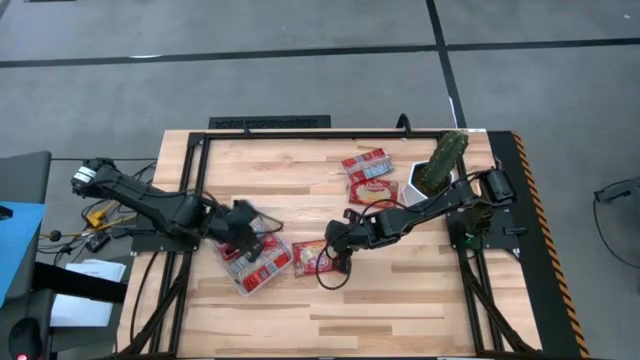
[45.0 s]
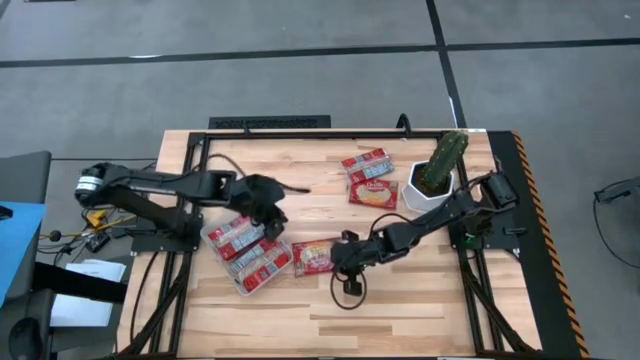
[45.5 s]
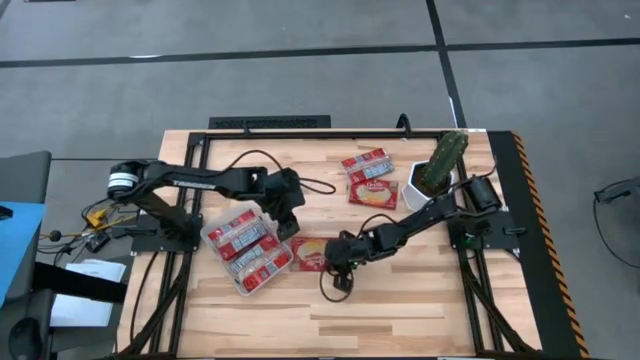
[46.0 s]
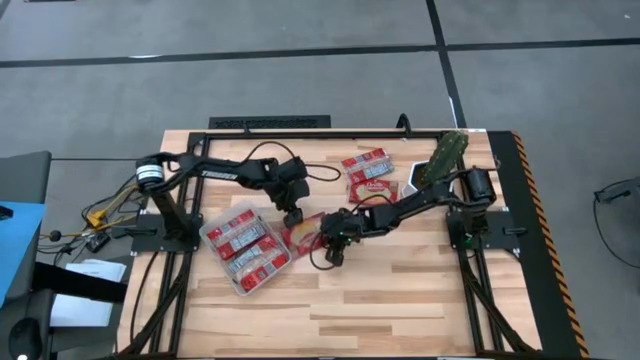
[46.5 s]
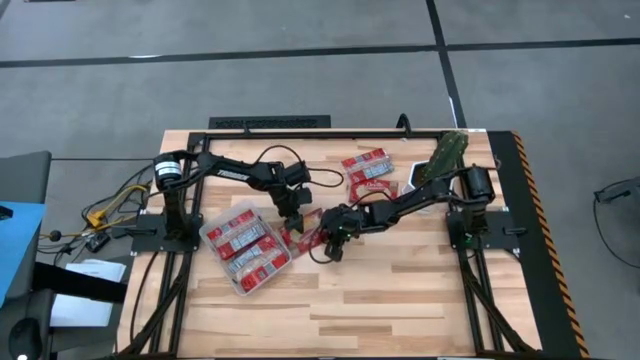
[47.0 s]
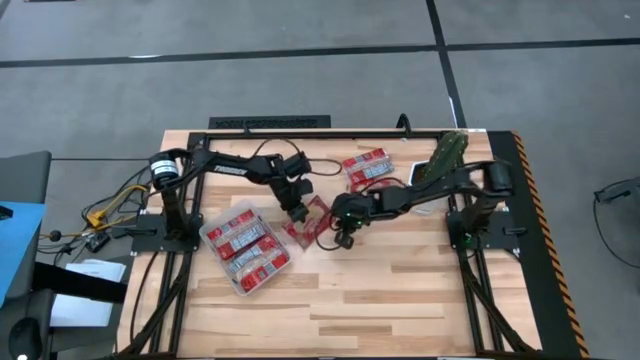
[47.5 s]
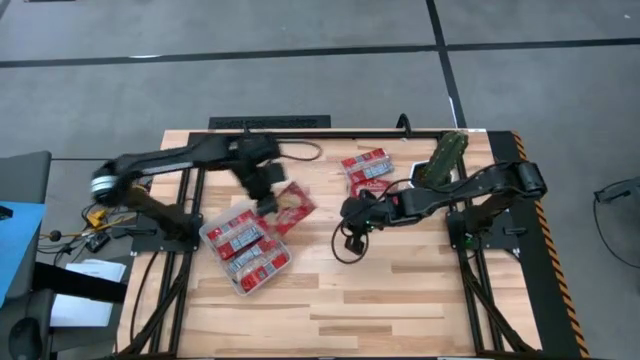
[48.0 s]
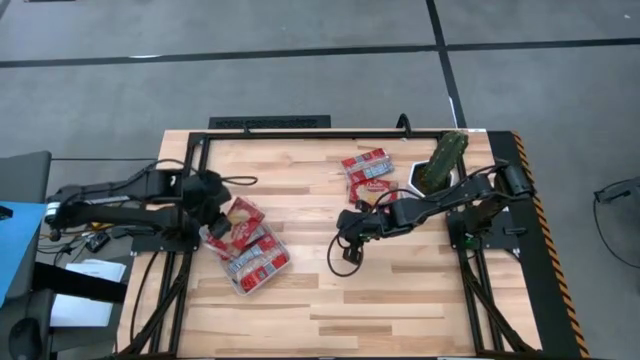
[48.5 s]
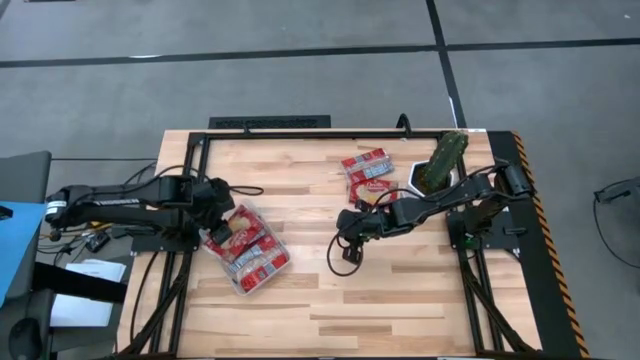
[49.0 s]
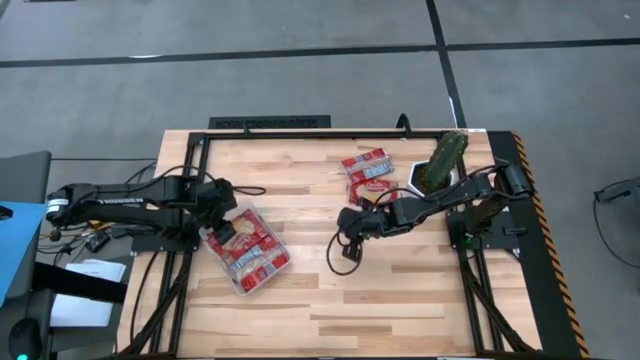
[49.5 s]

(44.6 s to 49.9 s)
Task: Sort popcorn bags into baskets
Put the red popcorn bag into the transparent bin

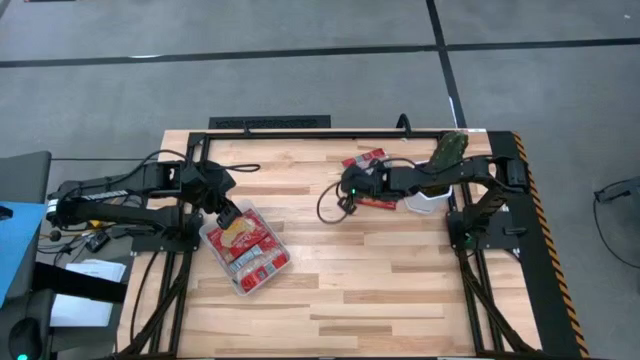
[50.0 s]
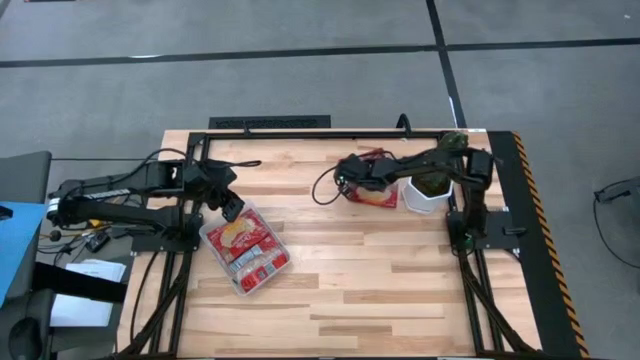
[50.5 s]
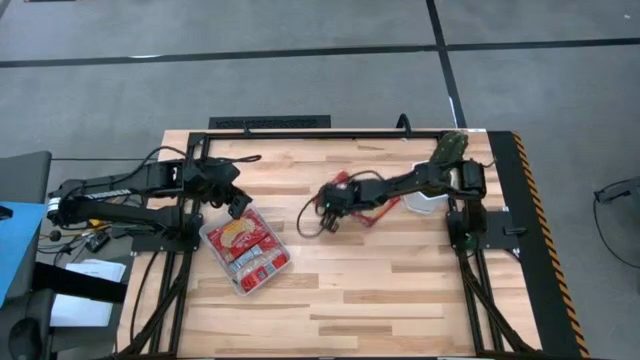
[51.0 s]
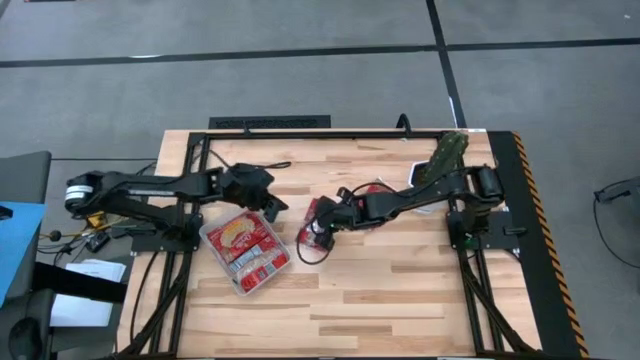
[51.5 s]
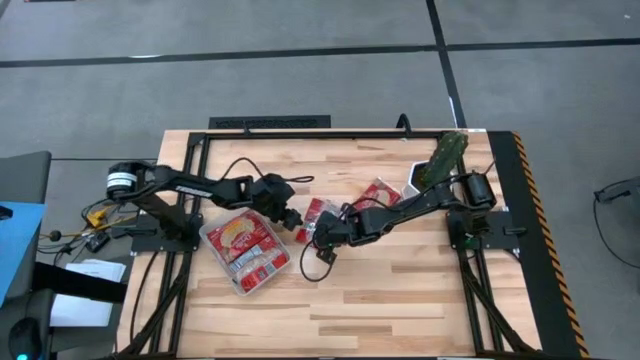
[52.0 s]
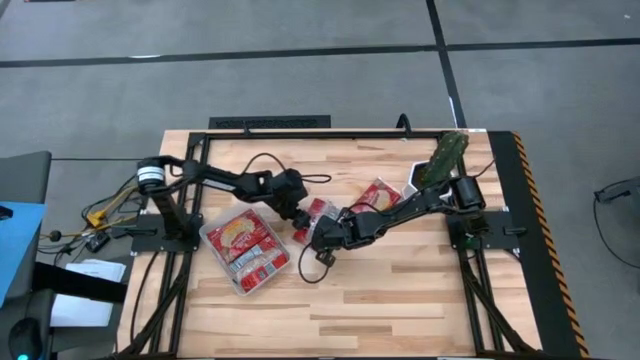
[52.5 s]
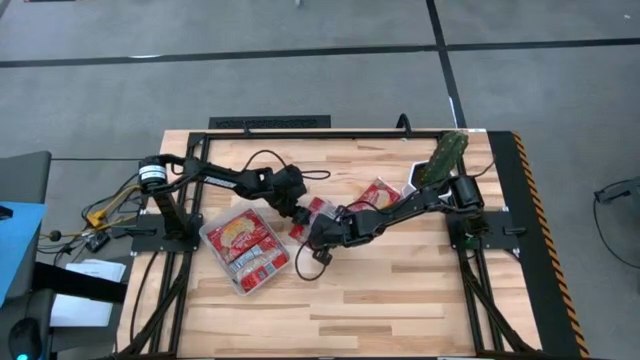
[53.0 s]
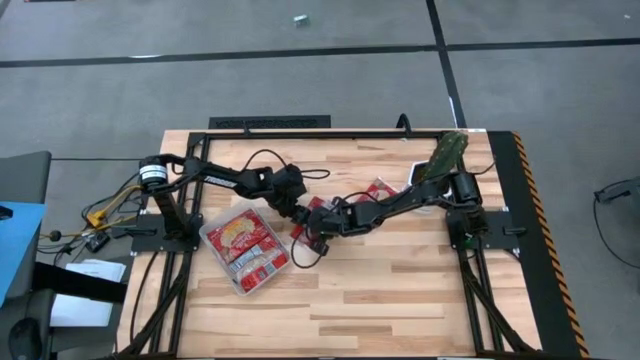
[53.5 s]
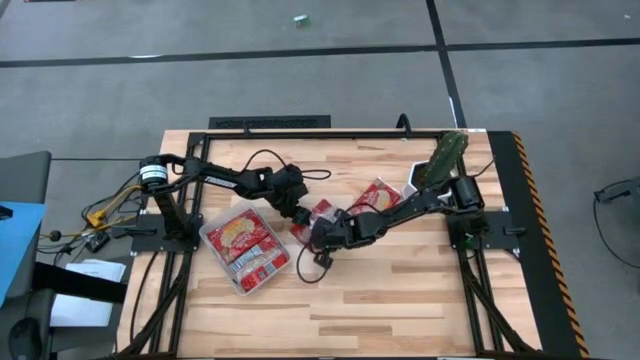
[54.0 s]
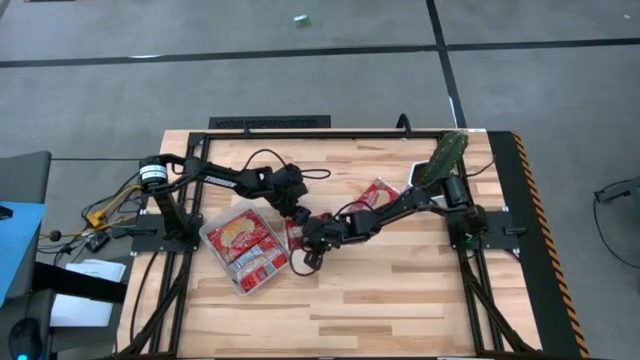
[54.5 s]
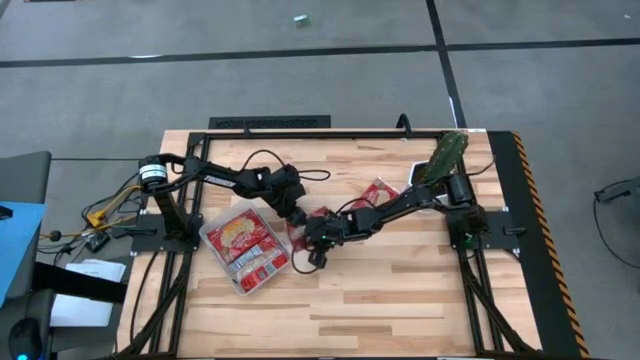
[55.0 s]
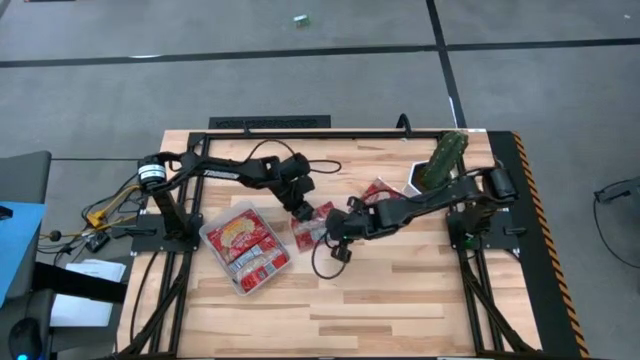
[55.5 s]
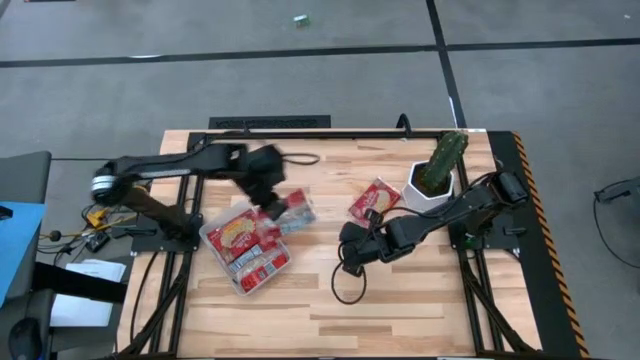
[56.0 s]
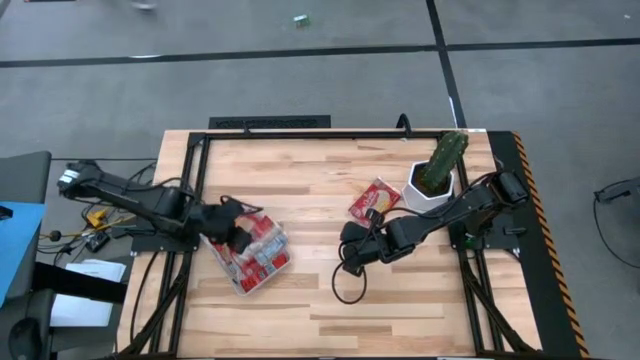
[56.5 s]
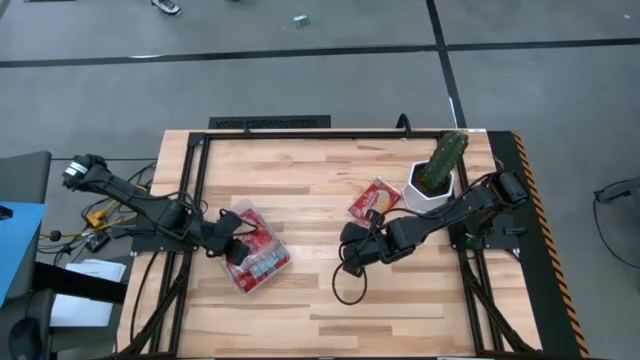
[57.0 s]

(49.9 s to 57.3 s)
Put the red popcorn bag into the transparent bin

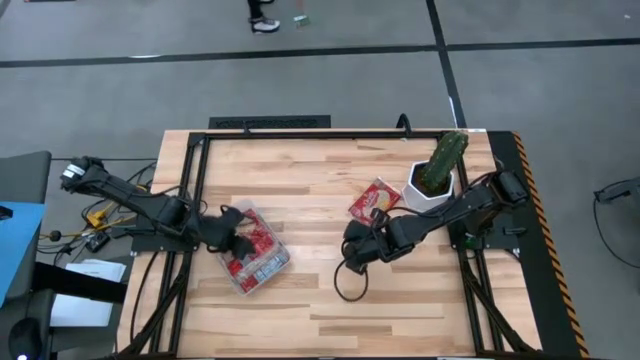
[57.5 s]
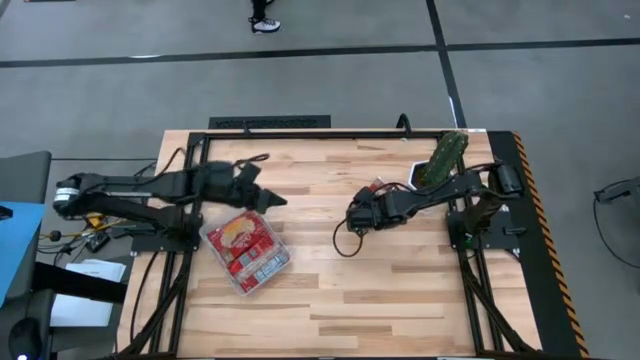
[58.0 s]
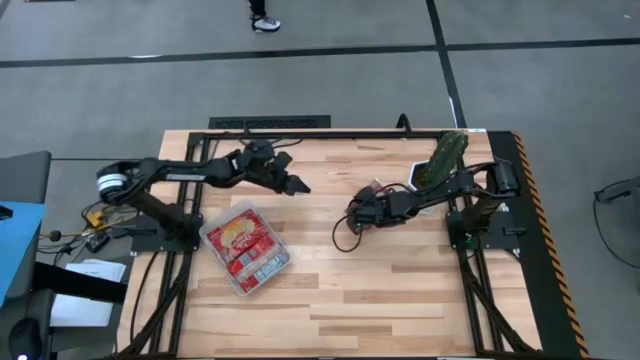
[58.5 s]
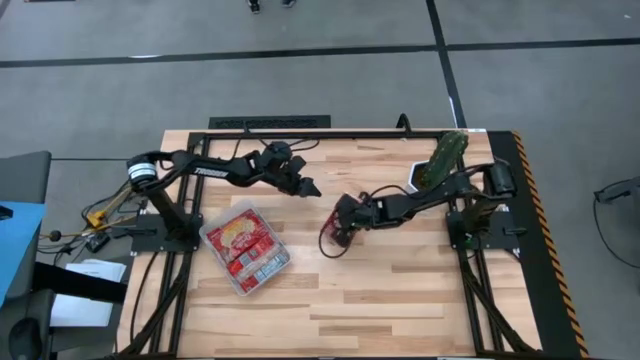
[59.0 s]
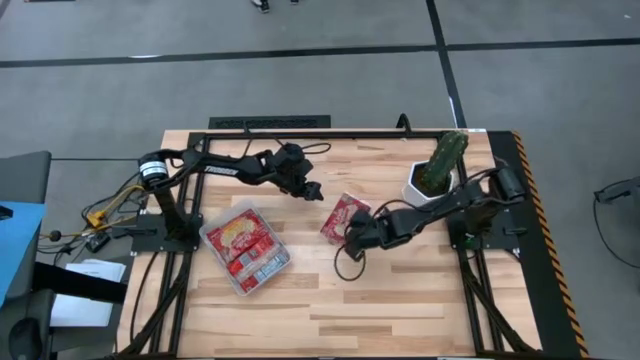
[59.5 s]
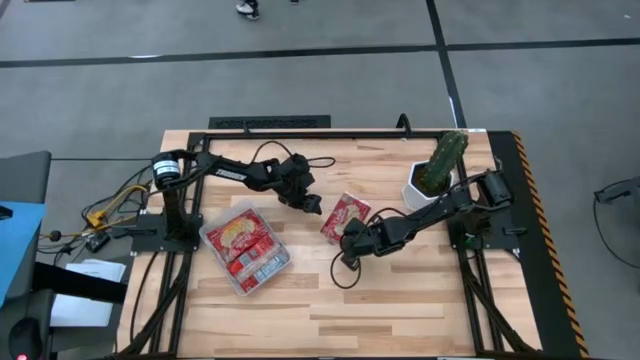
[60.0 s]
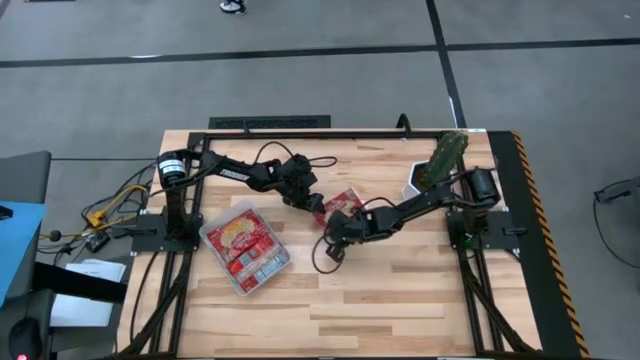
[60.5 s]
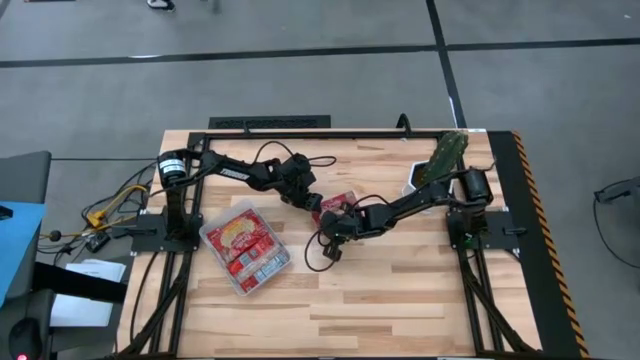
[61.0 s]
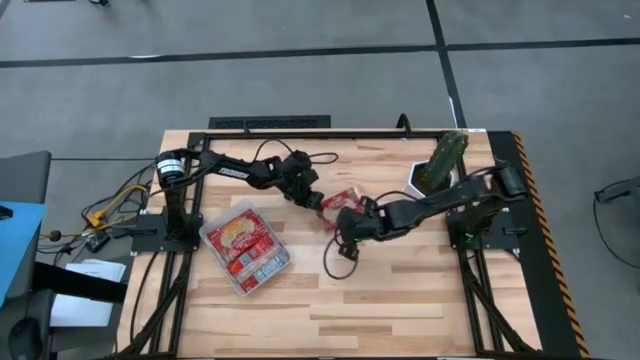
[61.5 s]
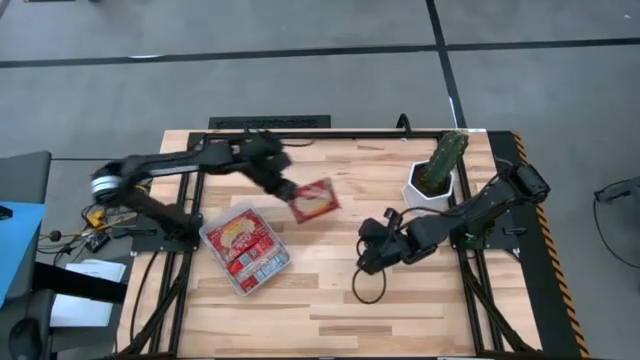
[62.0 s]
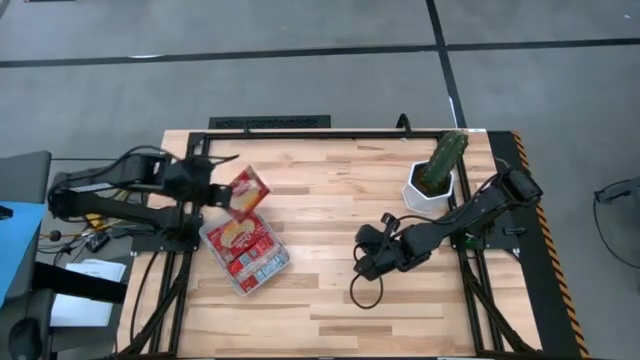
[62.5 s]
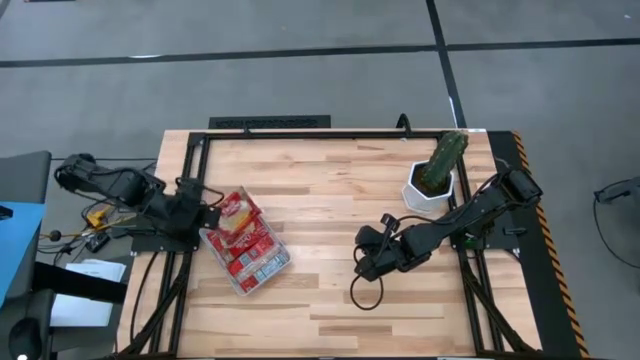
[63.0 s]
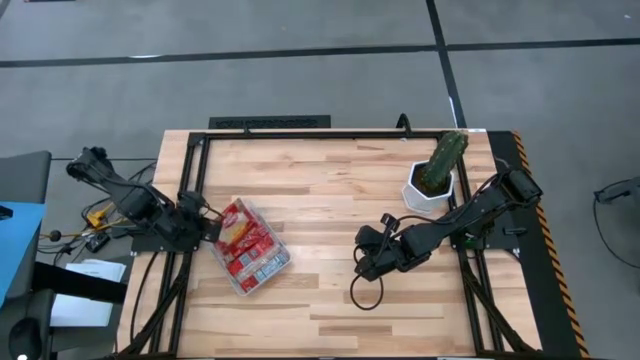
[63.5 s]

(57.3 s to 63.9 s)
Put the red popcorn bag into the transparent bin

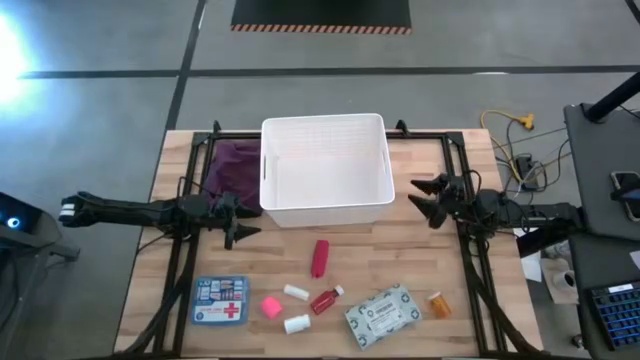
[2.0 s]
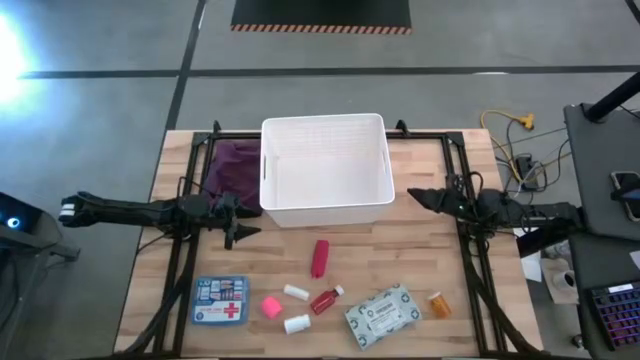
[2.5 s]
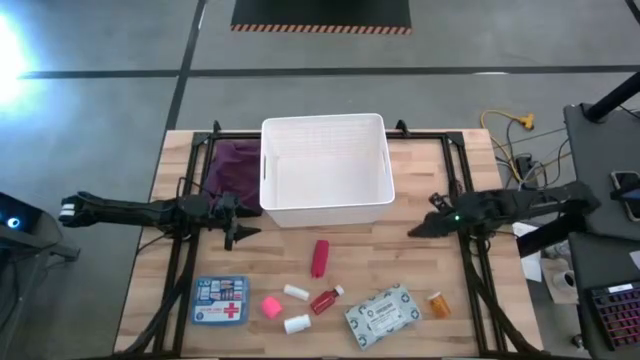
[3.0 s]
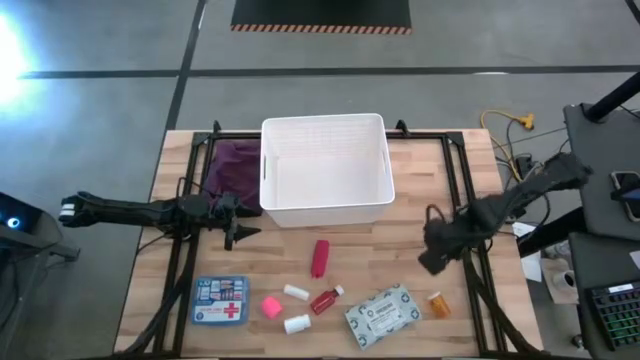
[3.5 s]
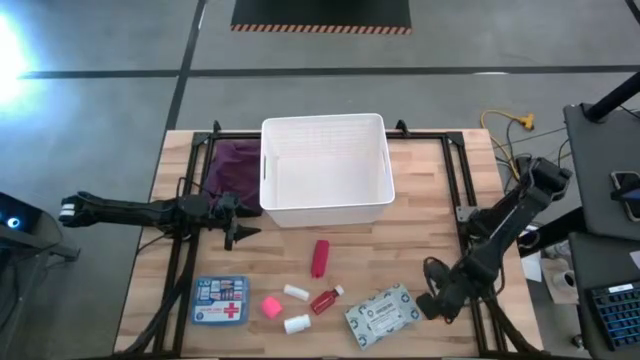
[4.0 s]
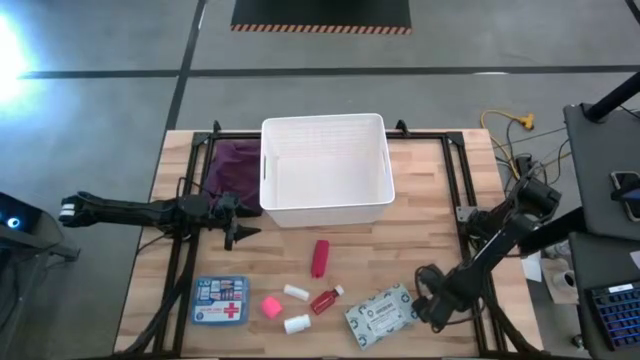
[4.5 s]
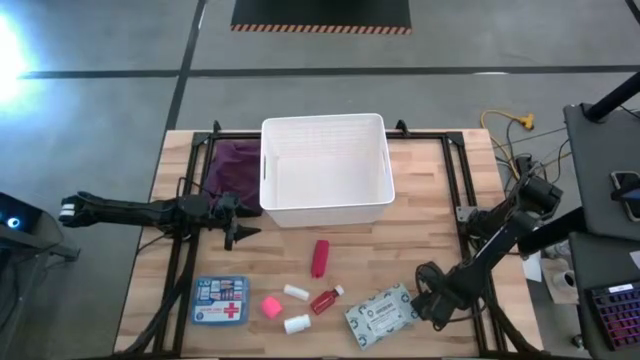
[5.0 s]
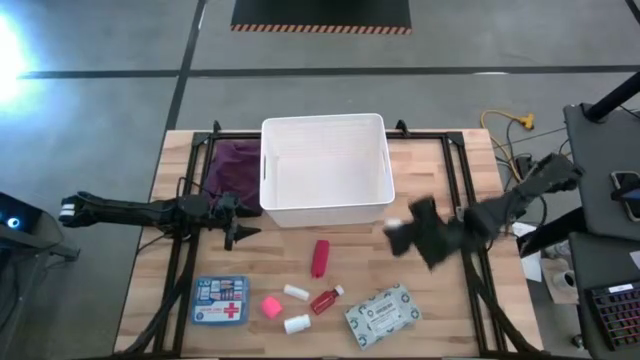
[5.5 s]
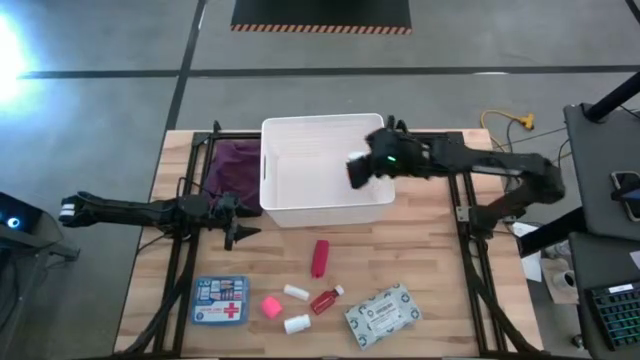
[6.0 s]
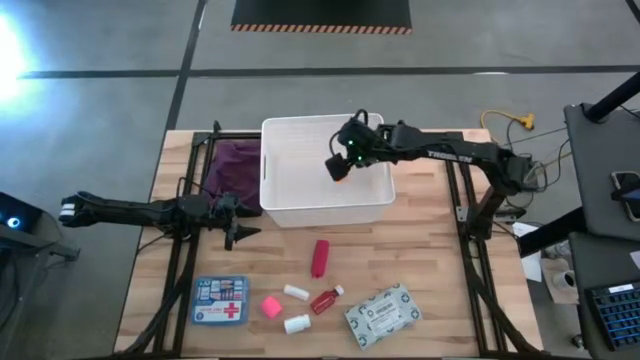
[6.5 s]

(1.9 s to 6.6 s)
Task: Pick & place medical supplies in basket/bin
Put the orange pill bottle into the white bin
